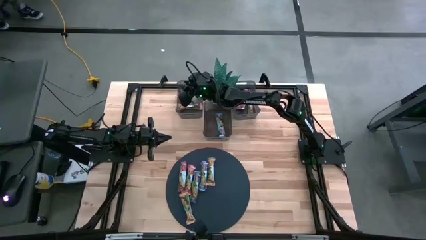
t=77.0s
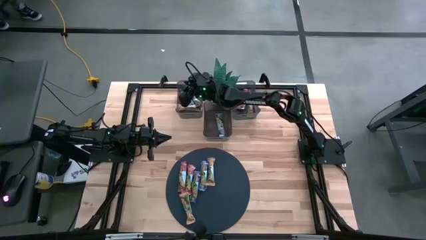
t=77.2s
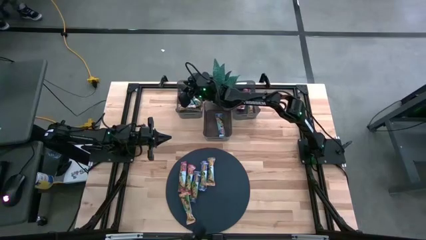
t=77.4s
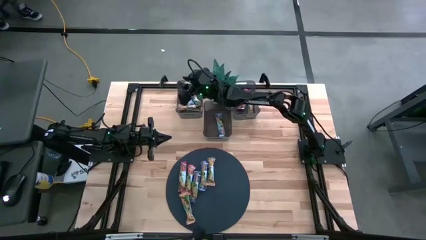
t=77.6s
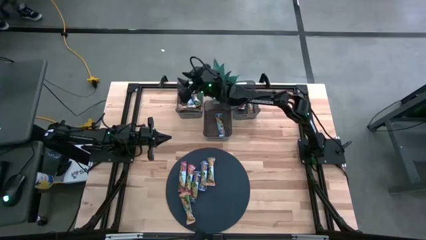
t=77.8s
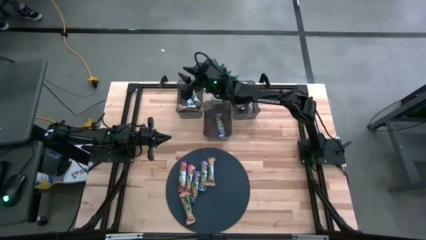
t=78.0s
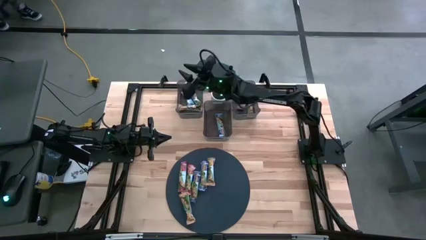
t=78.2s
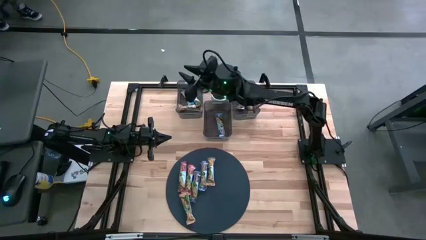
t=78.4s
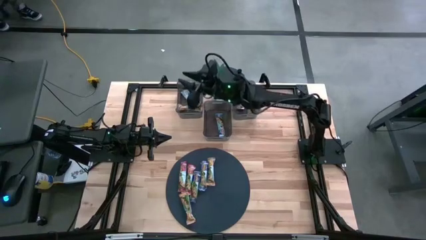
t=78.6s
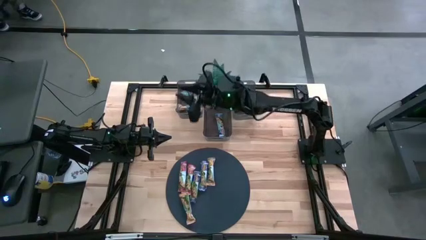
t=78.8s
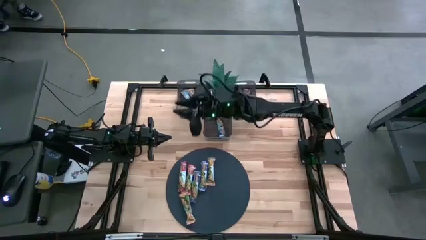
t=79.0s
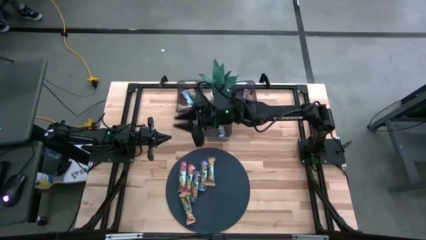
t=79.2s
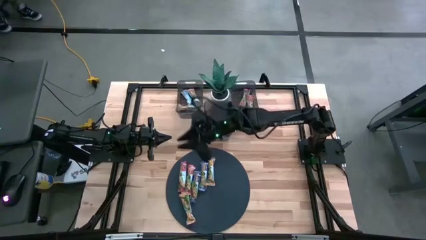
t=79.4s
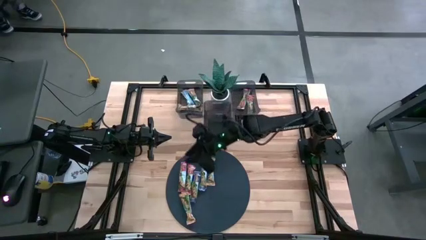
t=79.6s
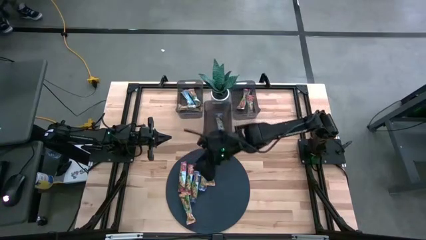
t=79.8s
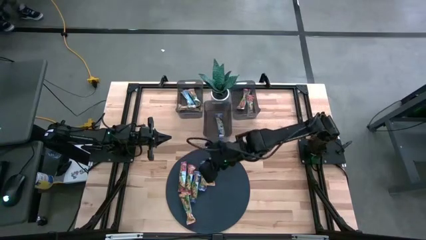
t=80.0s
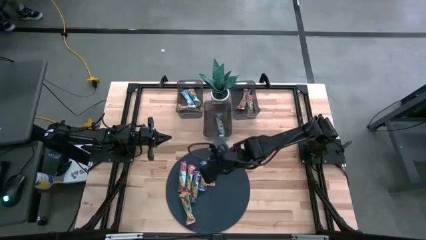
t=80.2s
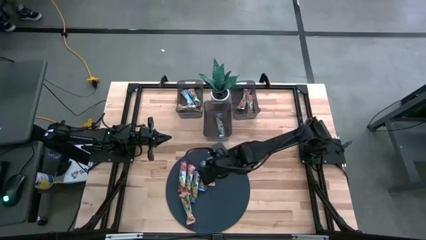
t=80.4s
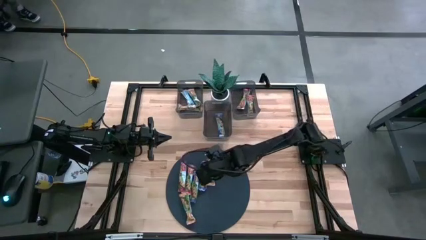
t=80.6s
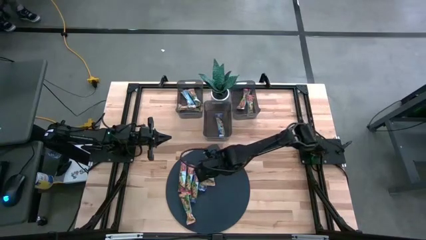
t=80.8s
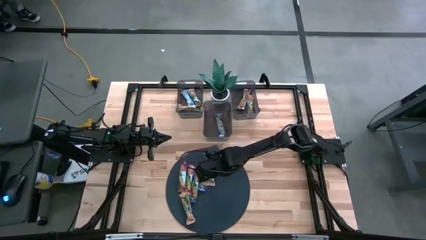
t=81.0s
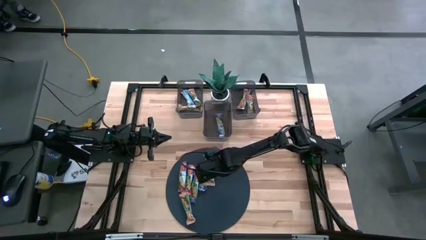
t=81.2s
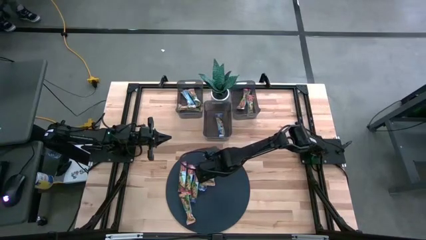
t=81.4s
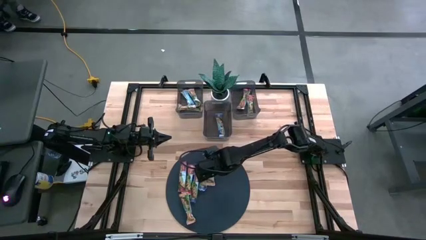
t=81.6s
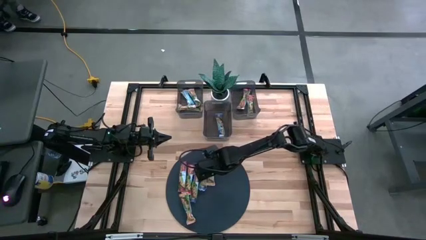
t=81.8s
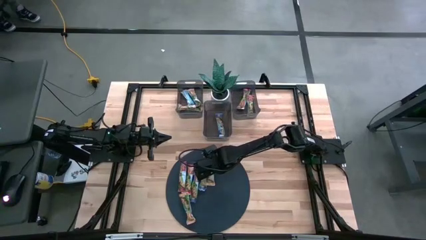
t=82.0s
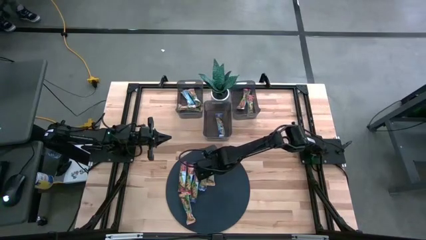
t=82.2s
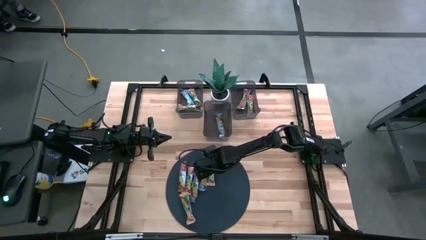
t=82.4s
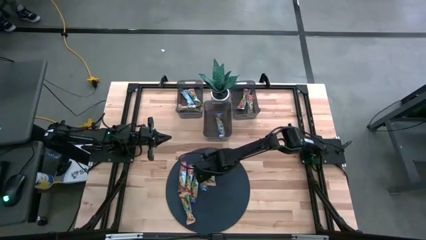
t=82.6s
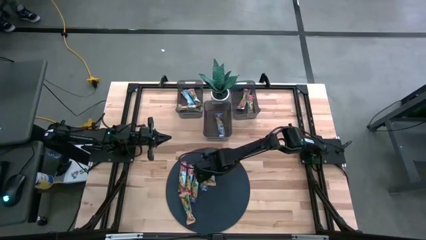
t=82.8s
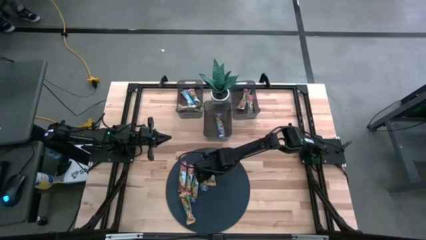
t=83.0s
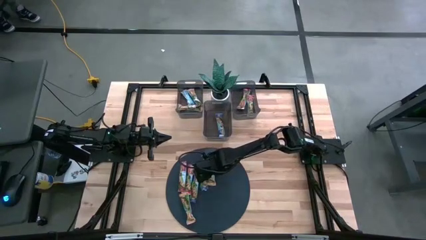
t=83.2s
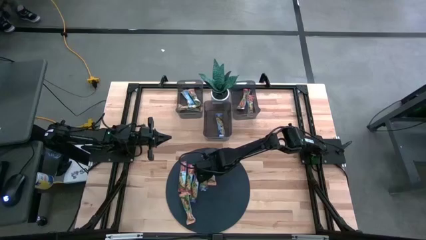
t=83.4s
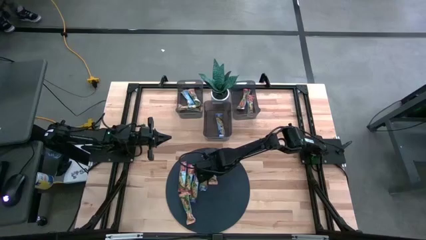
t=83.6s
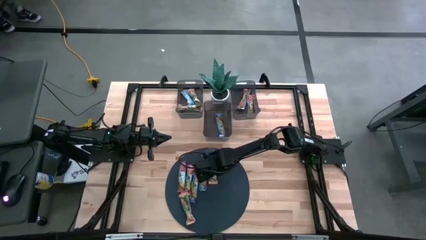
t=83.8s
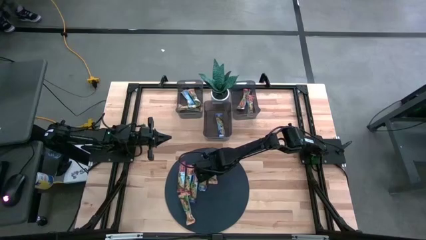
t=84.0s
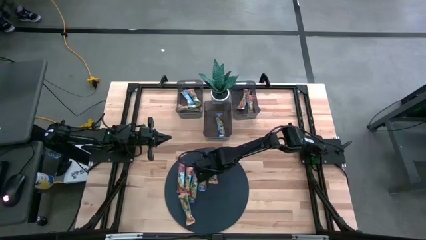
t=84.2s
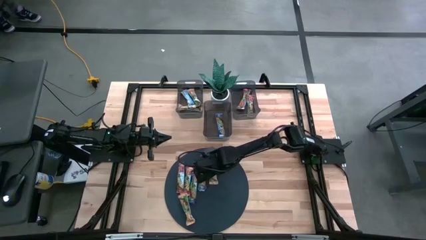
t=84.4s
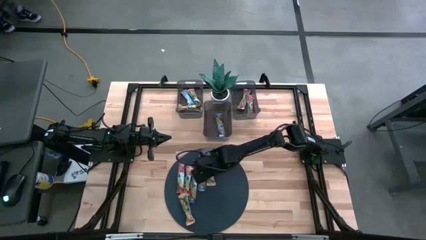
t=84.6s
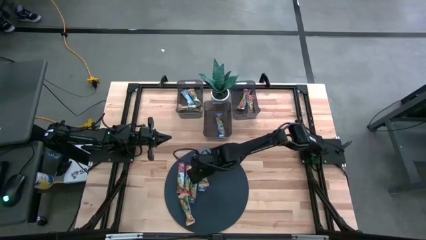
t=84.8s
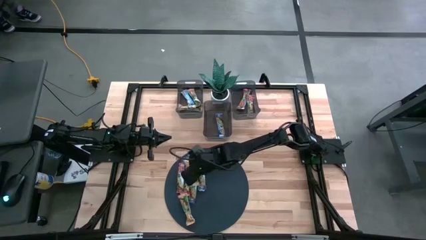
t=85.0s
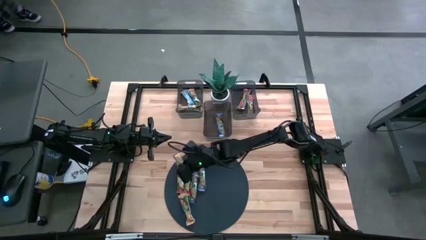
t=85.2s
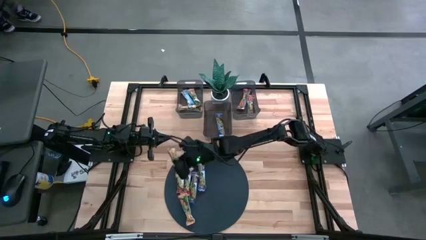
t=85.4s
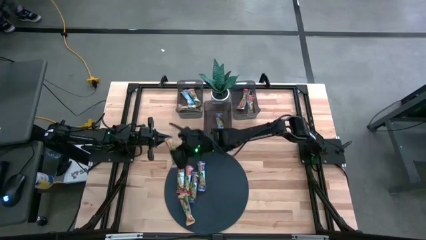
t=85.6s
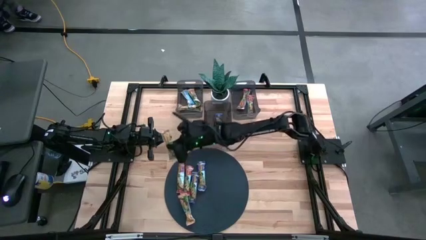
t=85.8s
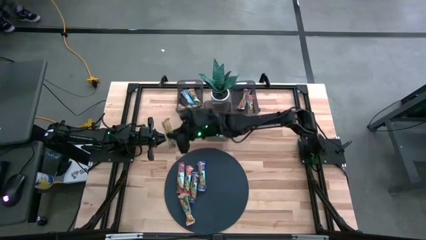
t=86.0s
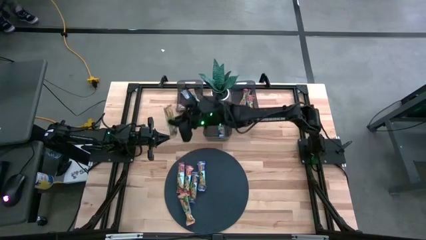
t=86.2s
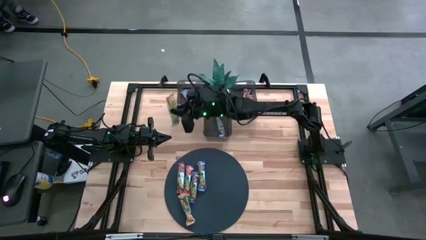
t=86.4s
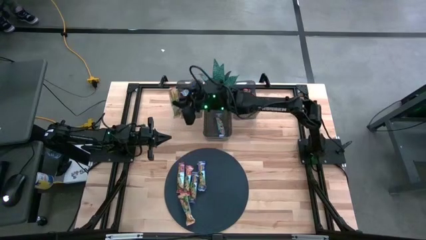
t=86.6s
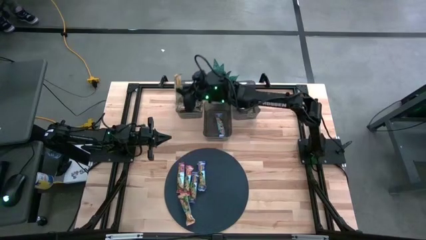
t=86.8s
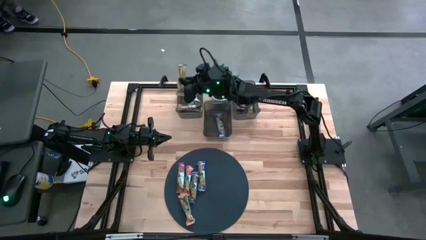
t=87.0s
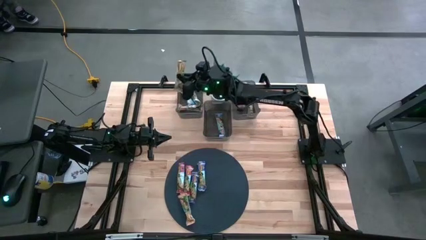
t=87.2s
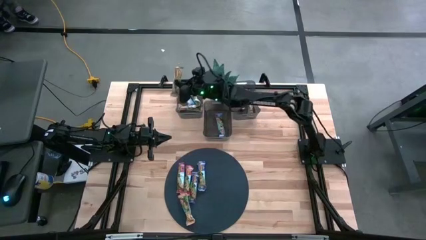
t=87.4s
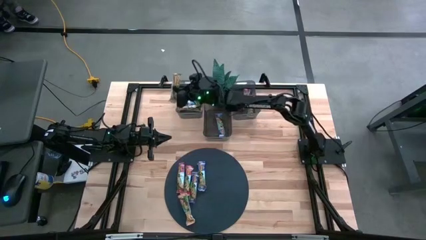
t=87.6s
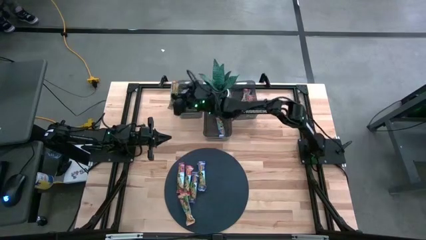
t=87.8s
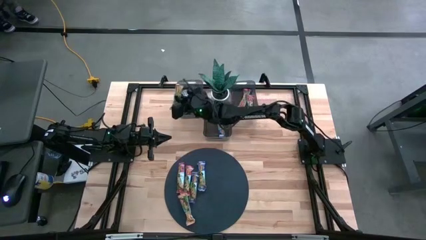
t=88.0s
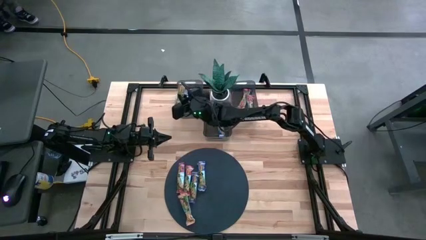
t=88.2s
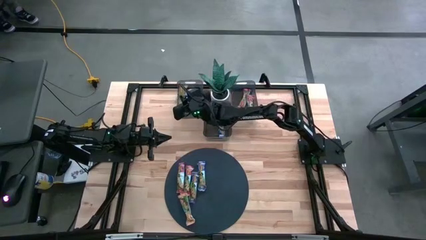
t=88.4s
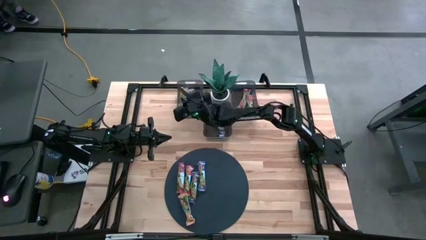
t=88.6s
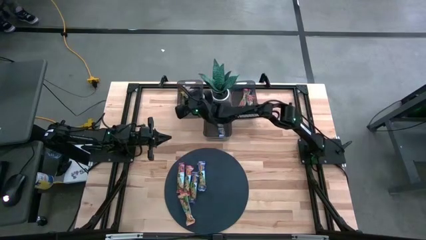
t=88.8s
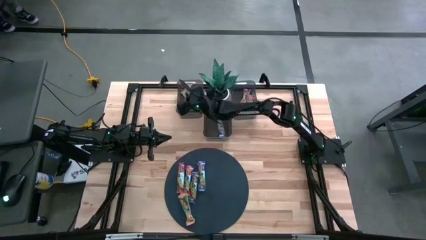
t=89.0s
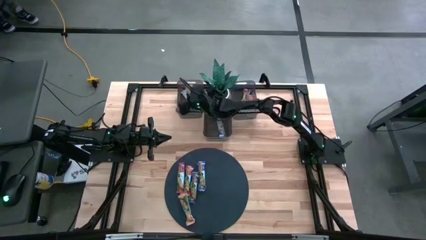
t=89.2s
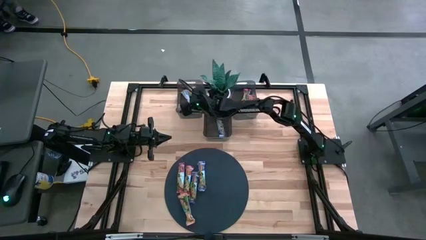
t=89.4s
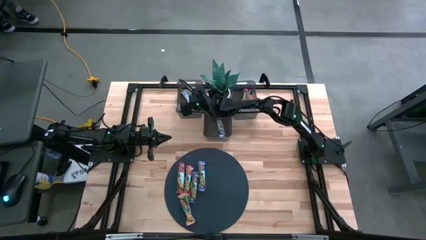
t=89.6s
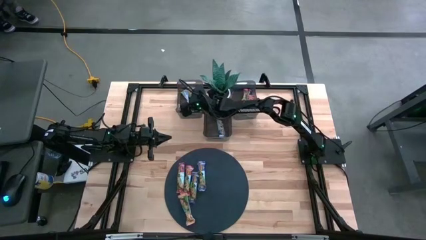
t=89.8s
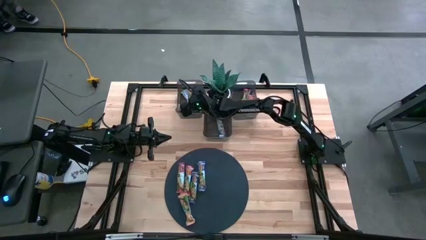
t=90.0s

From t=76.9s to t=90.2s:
Task: Pick and place Granola Bars by type
Put the yellow granola bar into the left black bin
